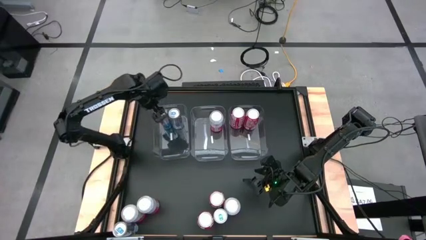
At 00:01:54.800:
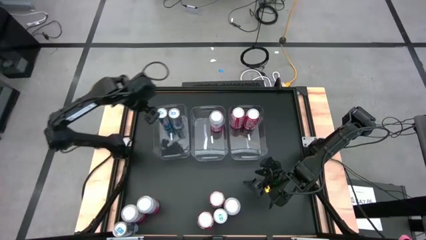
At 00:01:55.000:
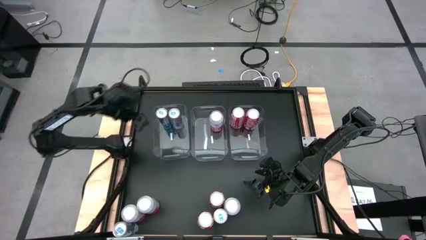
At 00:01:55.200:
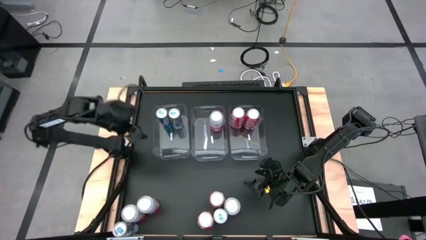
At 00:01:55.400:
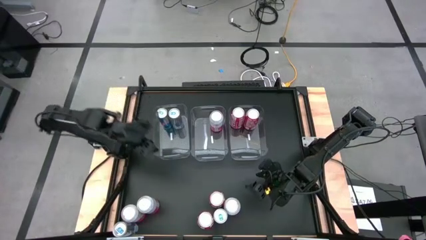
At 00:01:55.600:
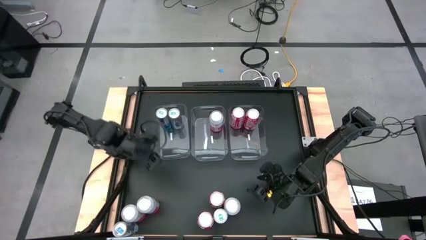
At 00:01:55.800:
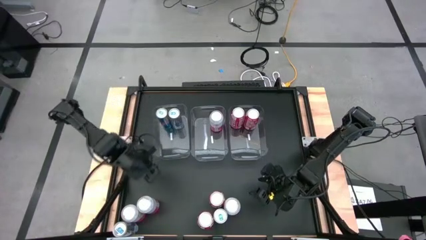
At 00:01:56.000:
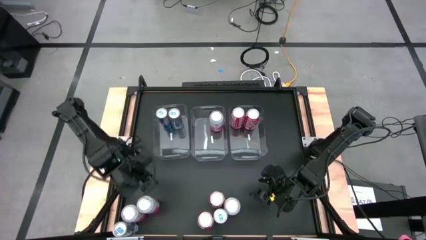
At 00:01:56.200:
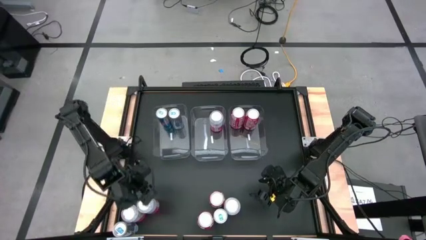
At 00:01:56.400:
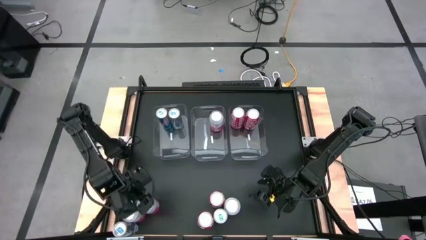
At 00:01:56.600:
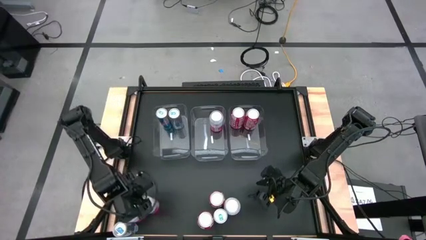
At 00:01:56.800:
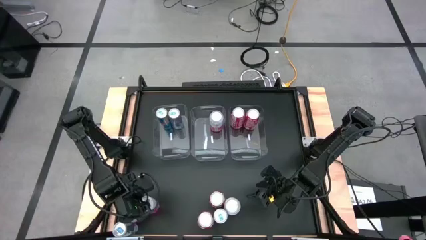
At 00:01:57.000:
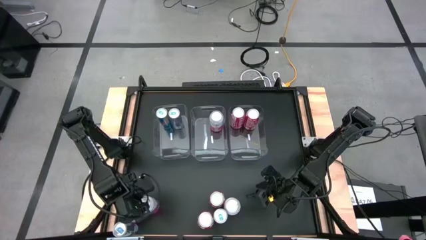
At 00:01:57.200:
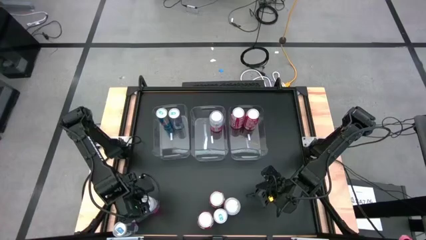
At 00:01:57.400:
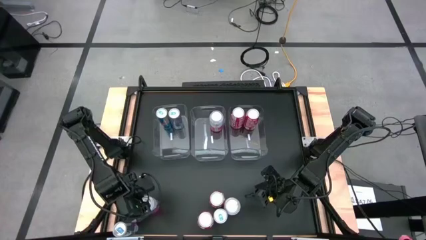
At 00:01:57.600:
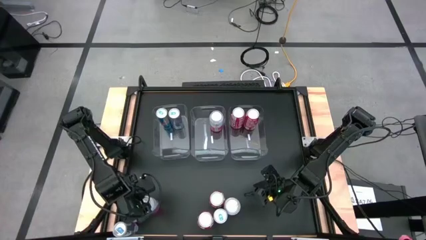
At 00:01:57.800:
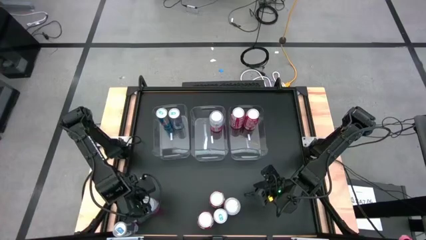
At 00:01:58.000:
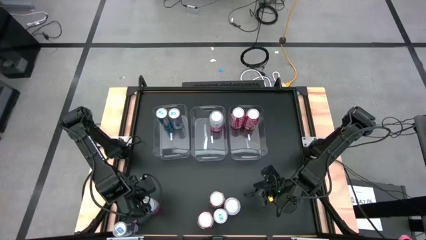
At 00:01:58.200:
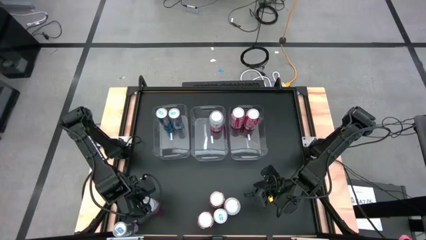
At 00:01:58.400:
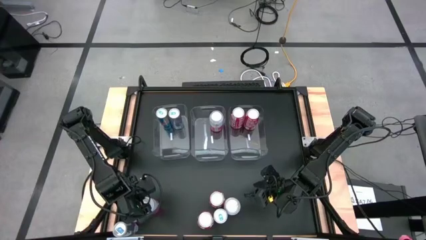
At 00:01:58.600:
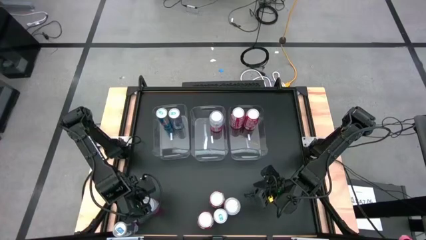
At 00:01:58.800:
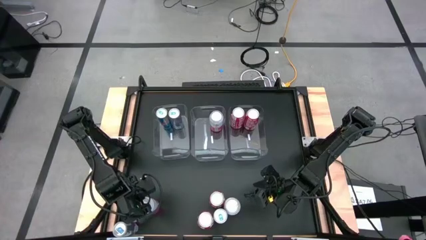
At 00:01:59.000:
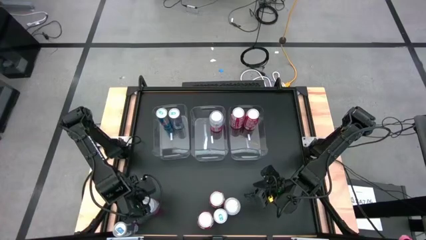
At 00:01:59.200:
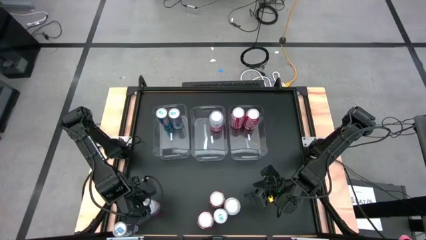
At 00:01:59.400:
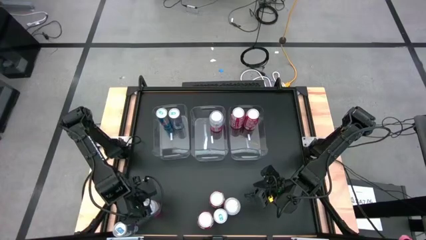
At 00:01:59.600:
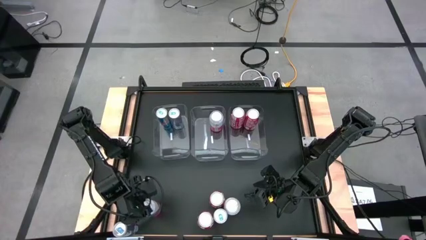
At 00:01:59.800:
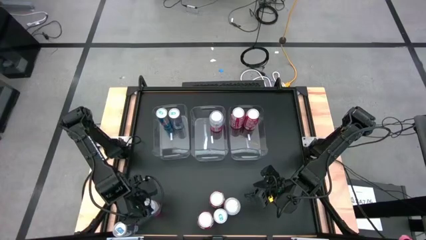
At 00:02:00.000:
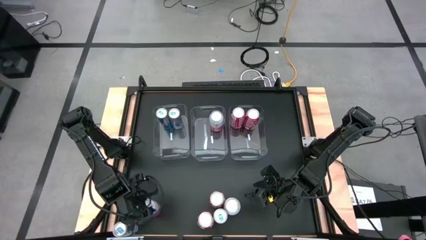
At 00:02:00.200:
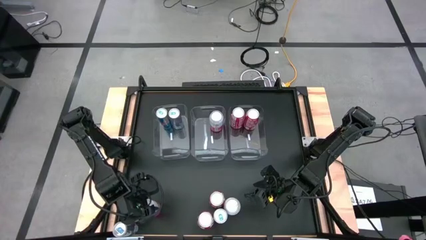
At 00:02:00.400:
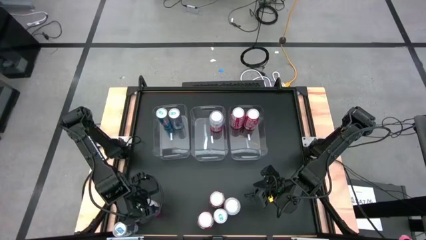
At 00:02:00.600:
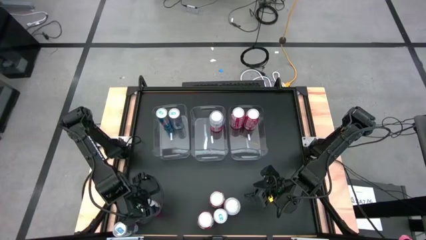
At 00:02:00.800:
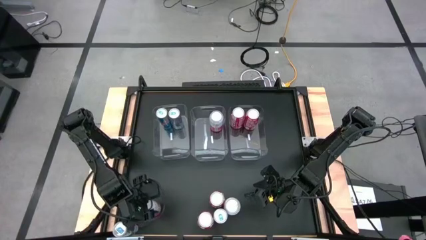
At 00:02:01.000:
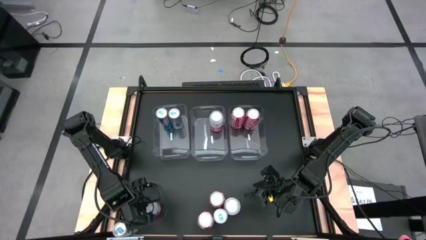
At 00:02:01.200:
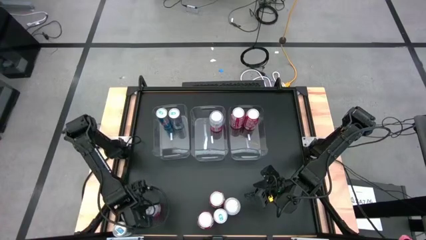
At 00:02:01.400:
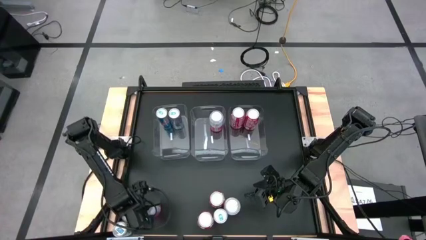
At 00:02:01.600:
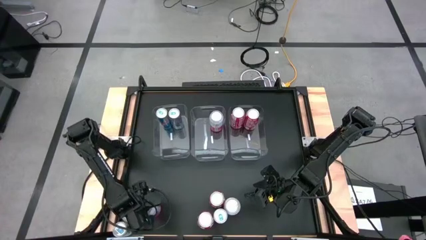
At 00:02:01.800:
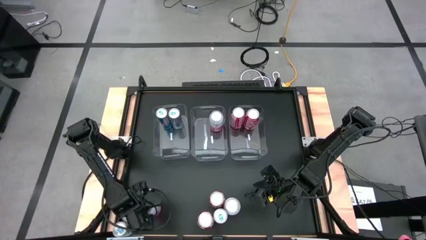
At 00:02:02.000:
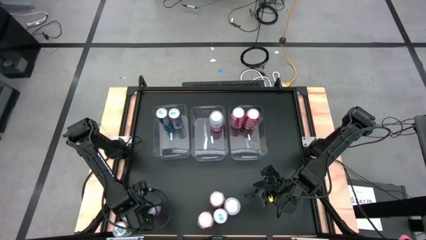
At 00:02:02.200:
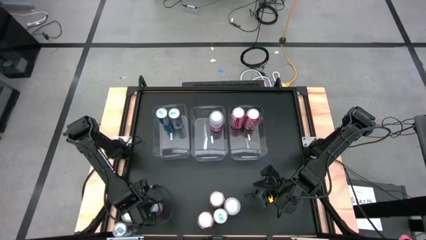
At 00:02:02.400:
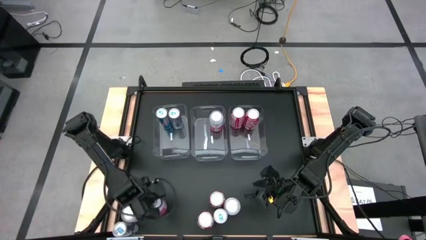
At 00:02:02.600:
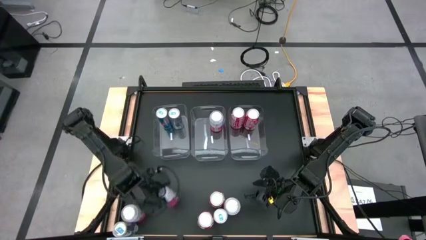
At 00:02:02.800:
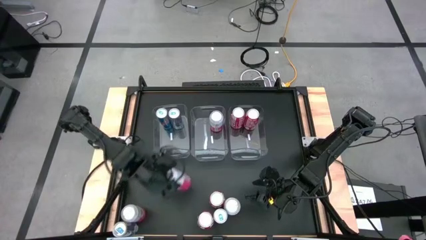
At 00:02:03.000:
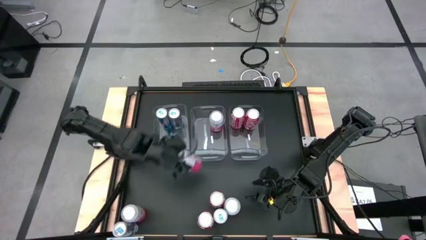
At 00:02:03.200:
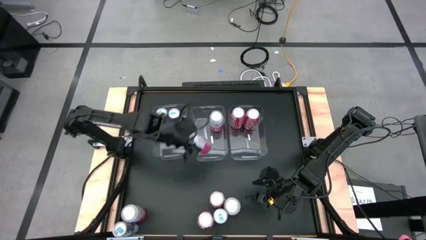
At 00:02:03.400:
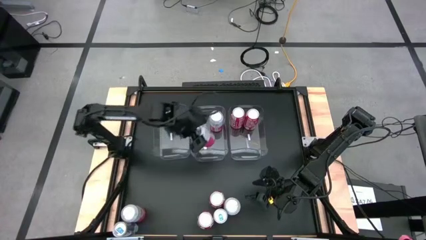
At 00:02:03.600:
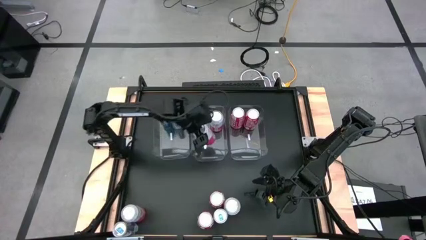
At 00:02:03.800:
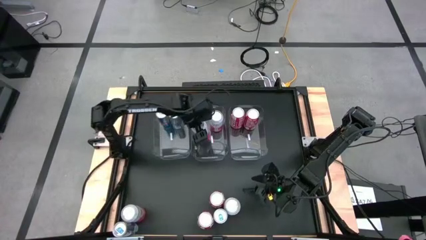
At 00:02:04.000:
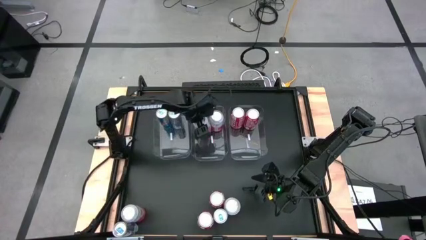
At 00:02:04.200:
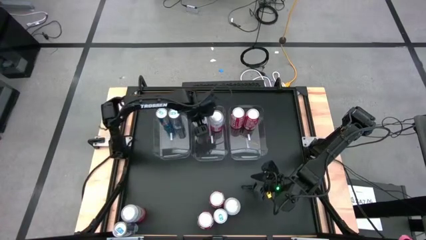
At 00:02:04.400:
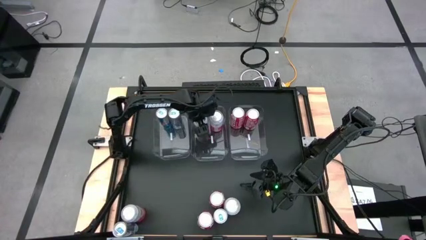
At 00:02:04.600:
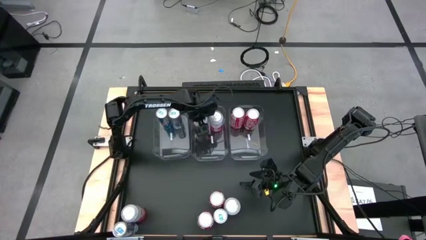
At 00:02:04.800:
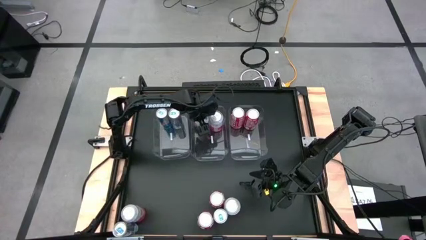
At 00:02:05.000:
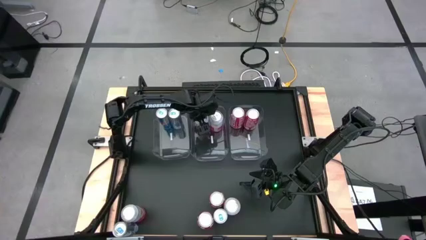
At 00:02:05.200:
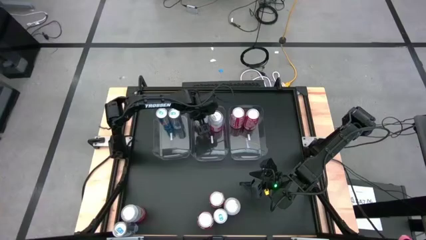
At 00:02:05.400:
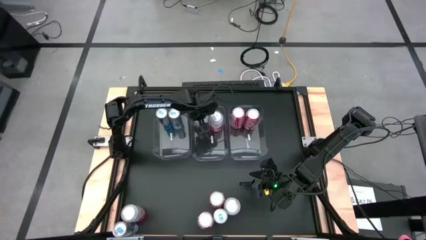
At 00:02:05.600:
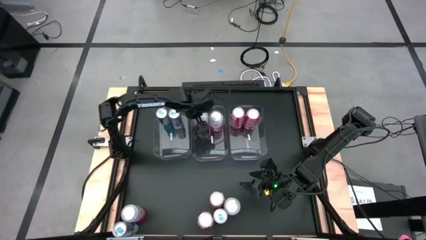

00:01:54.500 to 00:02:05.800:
Task: Sort soda cans
Put the pink-white soda can into the middle transparent bin

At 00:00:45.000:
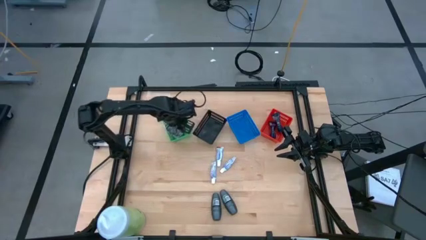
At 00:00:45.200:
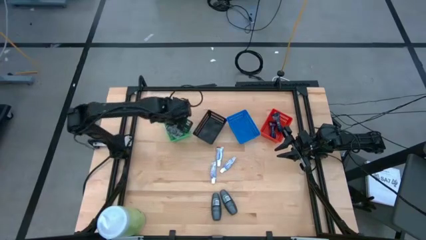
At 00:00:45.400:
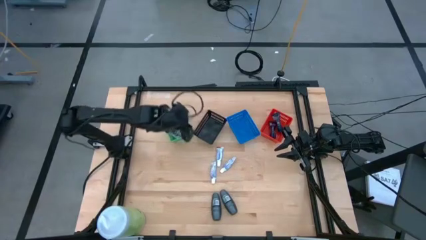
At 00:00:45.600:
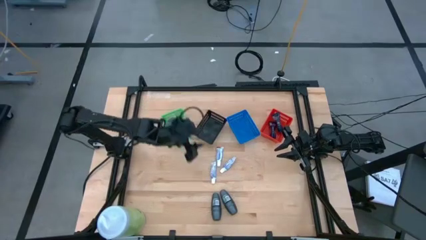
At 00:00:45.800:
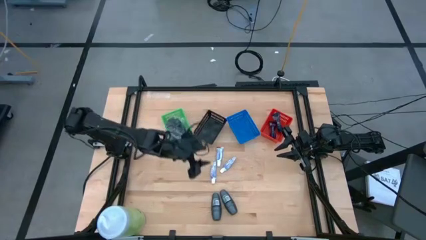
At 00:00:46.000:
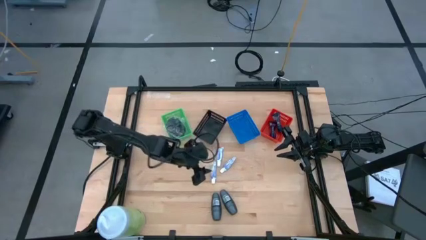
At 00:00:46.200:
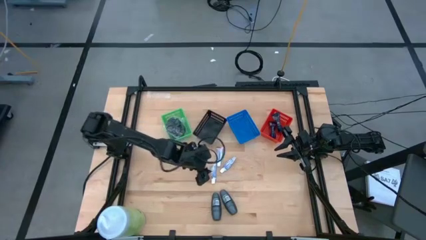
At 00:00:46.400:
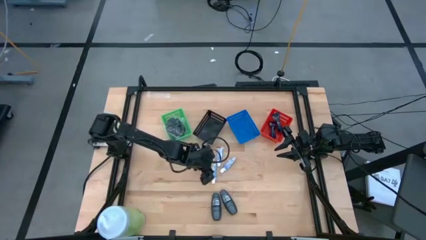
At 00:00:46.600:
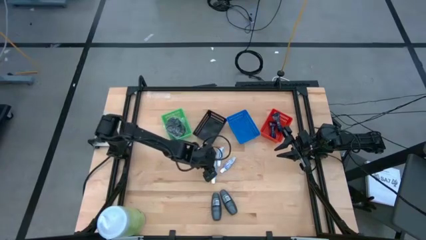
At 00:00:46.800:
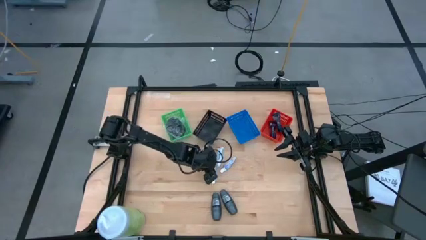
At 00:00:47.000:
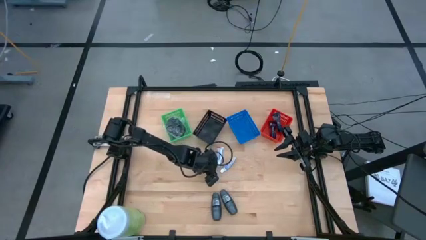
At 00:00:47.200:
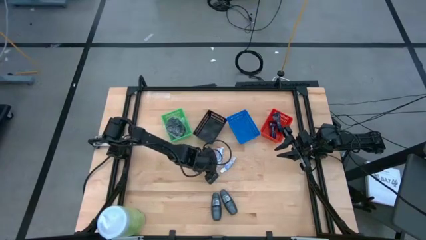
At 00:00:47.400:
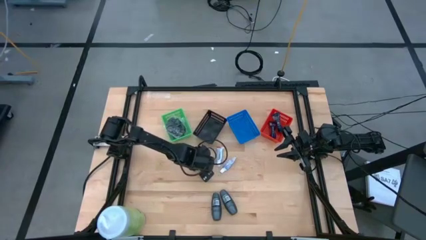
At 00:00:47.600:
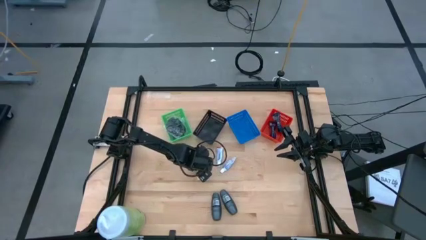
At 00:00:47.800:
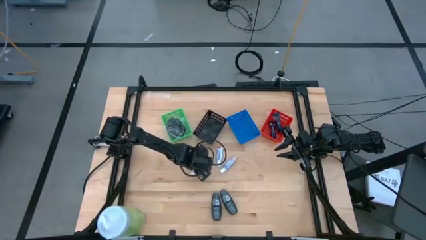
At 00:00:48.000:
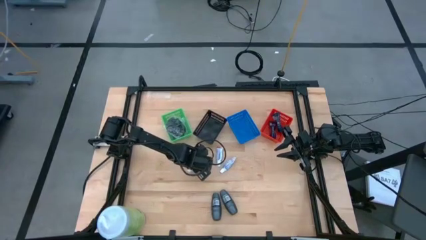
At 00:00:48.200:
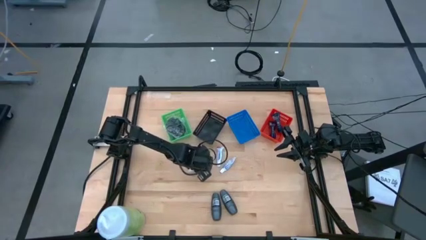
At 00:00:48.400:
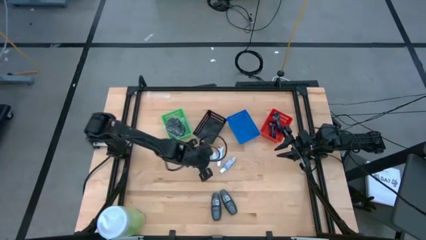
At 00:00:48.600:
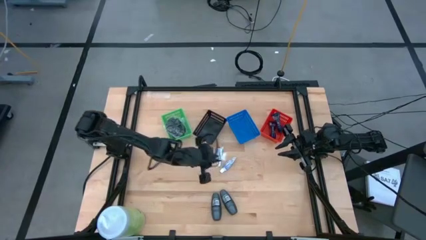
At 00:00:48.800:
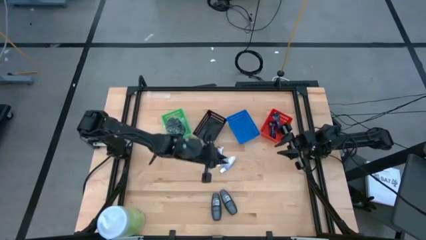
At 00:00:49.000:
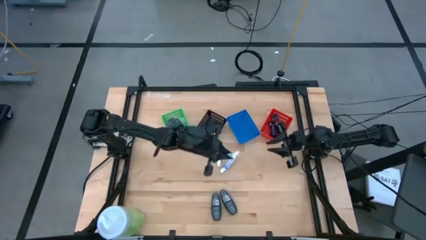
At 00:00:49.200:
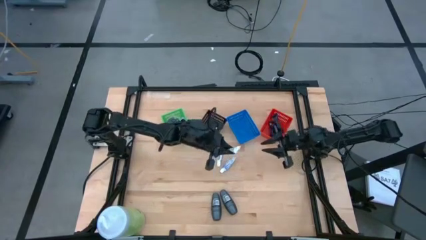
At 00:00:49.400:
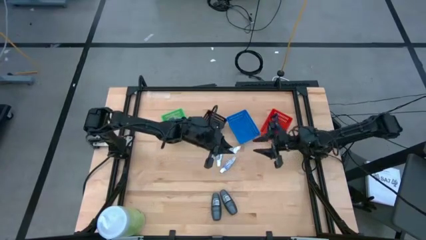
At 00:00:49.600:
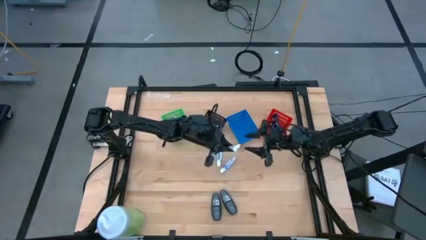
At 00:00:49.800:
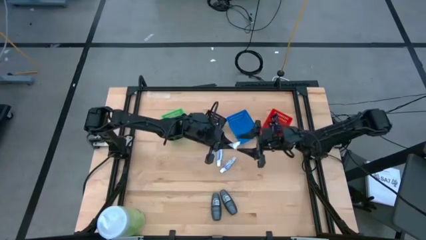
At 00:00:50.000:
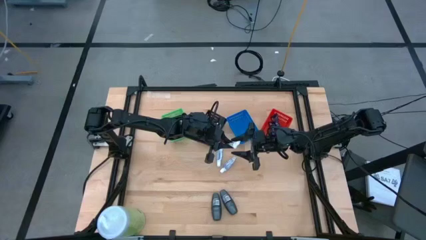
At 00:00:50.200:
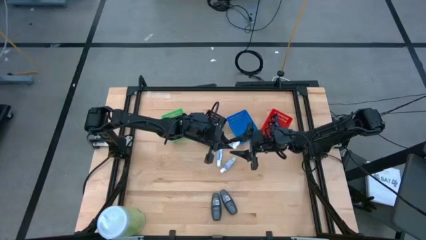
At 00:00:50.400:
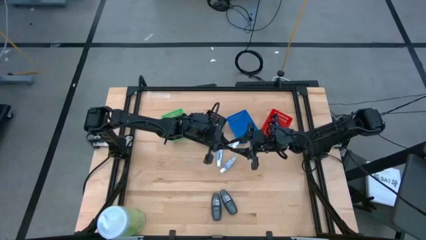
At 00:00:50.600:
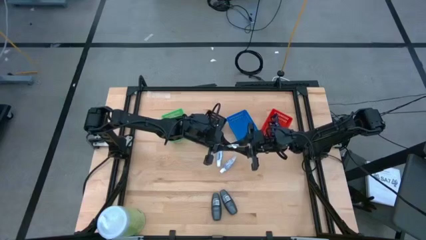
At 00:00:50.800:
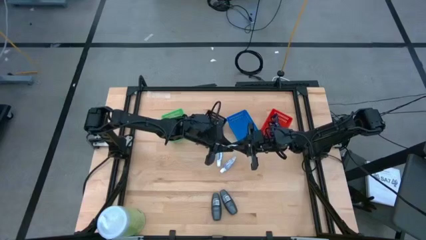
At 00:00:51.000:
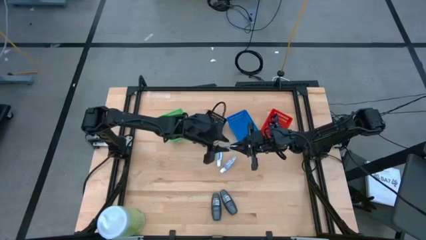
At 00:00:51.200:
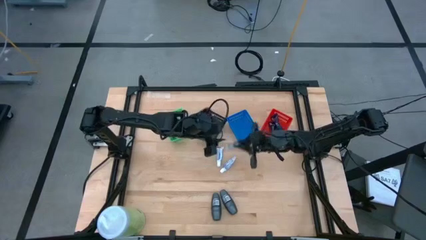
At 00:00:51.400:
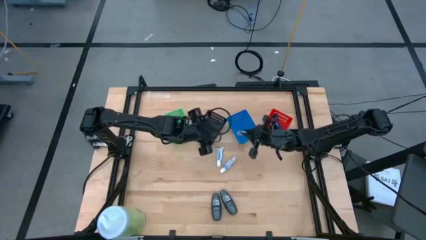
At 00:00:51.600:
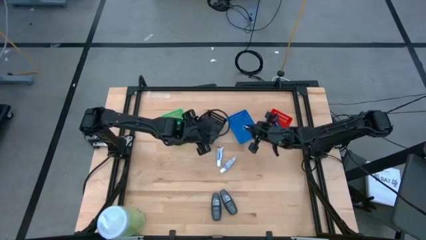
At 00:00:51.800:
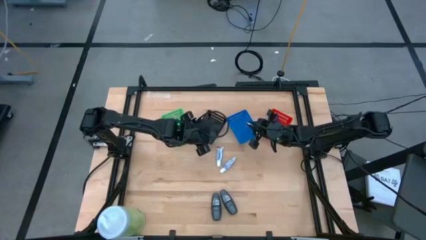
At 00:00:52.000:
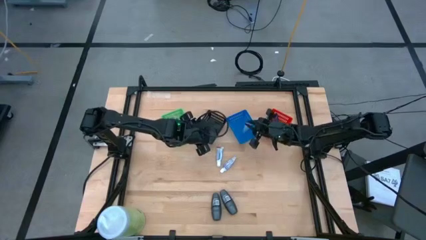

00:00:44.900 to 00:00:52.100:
Task: Pick & Place Travel size toiletries
Put the bottom white toothpaste into the blue bin
